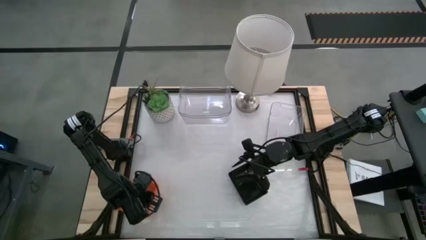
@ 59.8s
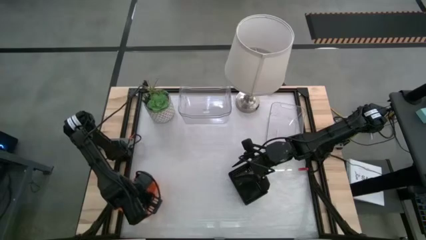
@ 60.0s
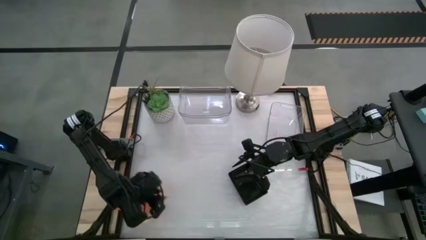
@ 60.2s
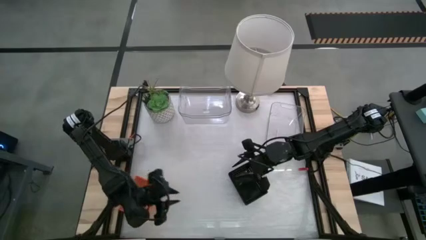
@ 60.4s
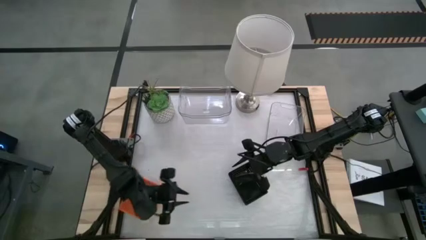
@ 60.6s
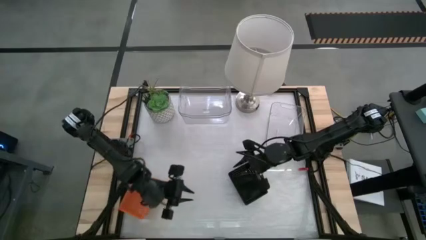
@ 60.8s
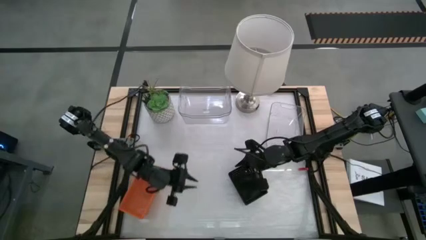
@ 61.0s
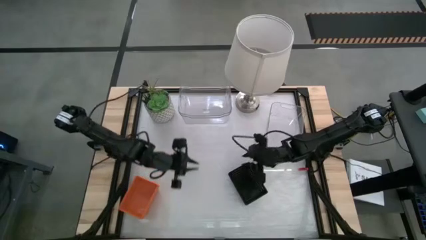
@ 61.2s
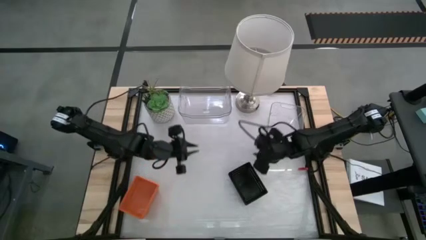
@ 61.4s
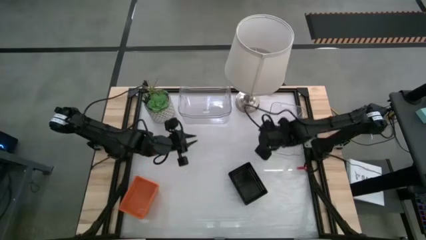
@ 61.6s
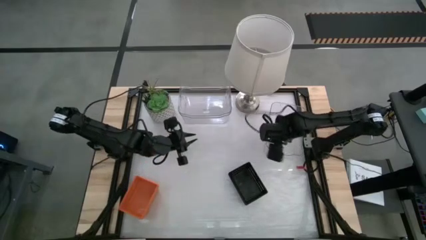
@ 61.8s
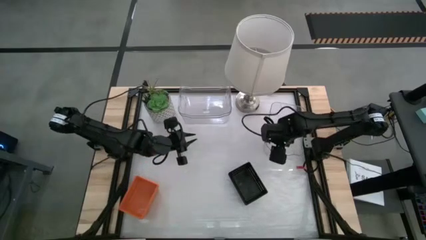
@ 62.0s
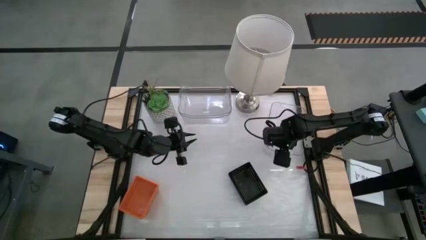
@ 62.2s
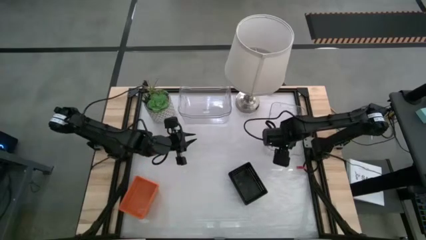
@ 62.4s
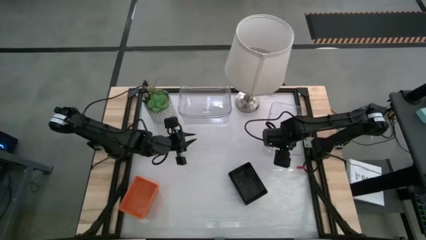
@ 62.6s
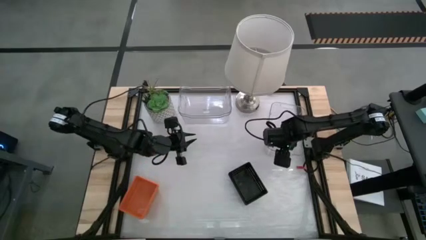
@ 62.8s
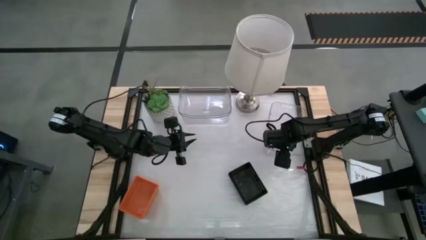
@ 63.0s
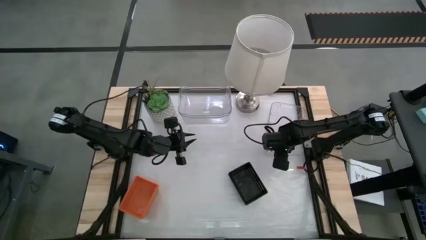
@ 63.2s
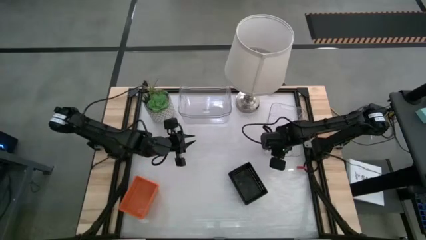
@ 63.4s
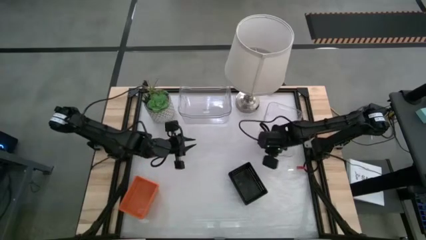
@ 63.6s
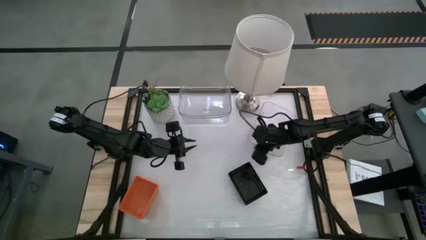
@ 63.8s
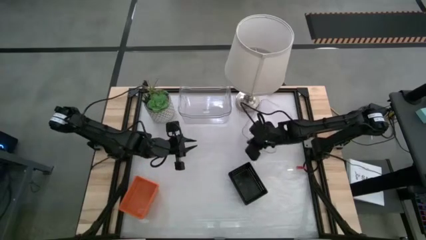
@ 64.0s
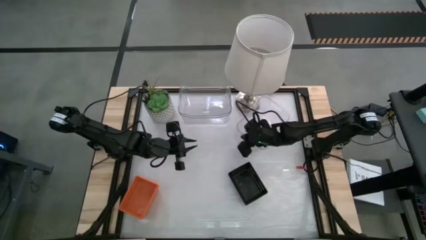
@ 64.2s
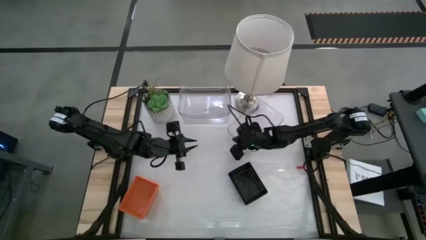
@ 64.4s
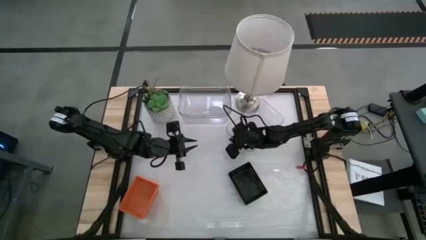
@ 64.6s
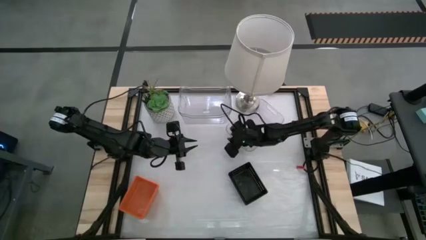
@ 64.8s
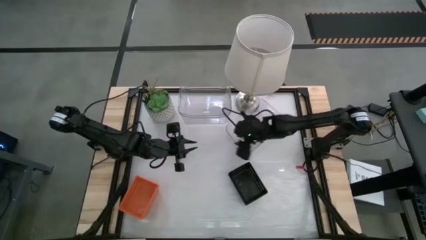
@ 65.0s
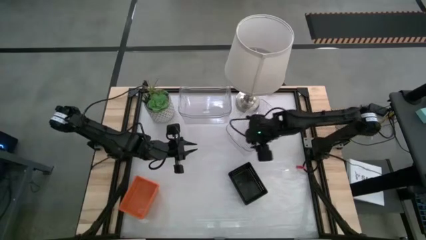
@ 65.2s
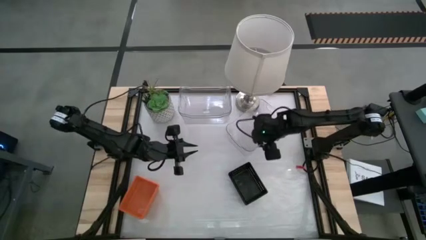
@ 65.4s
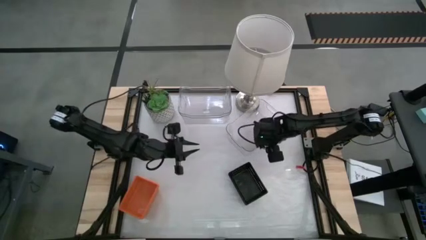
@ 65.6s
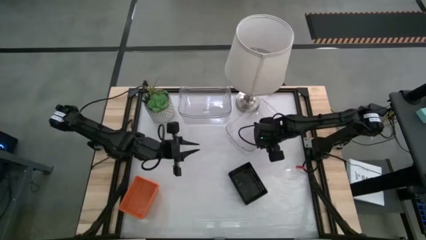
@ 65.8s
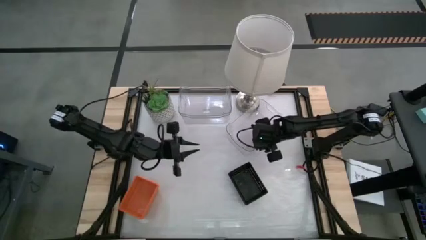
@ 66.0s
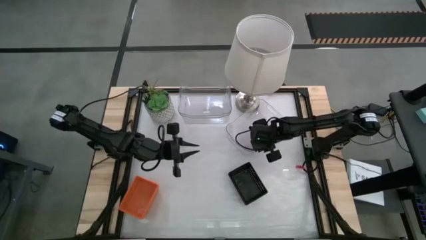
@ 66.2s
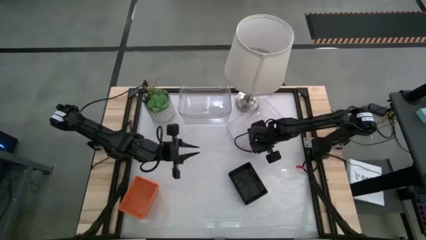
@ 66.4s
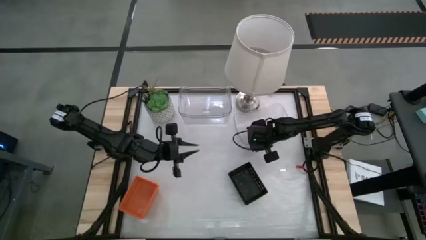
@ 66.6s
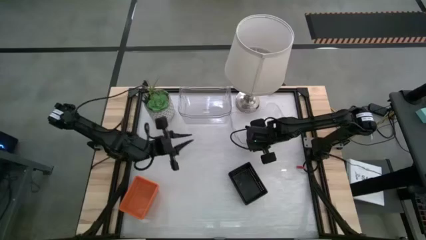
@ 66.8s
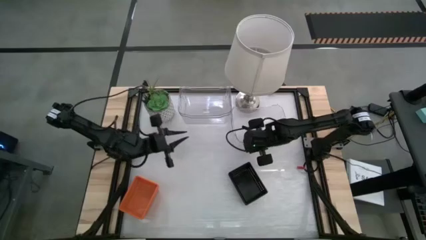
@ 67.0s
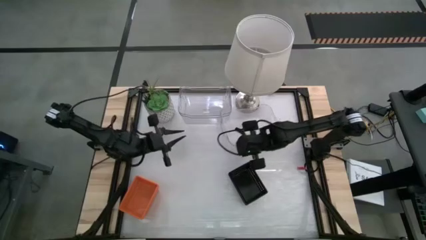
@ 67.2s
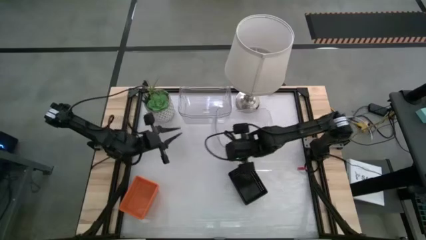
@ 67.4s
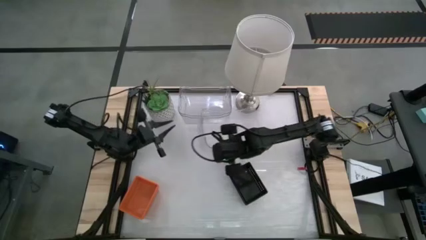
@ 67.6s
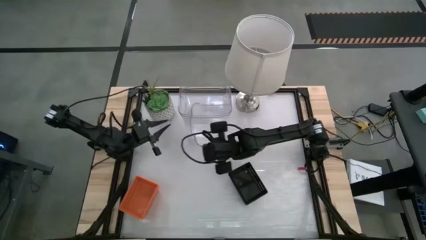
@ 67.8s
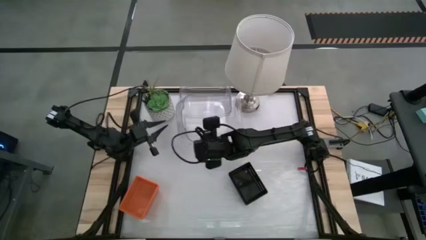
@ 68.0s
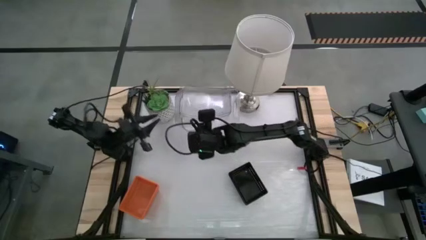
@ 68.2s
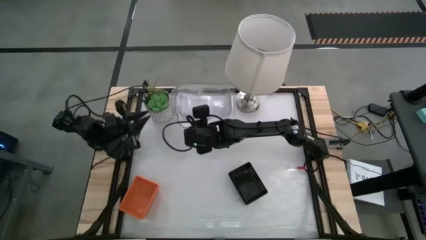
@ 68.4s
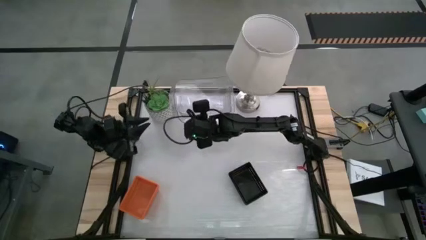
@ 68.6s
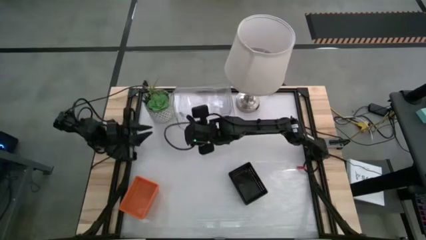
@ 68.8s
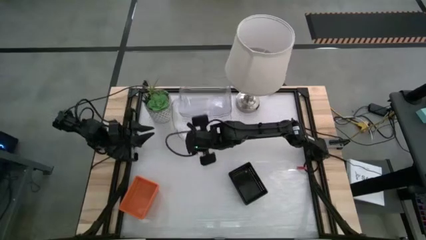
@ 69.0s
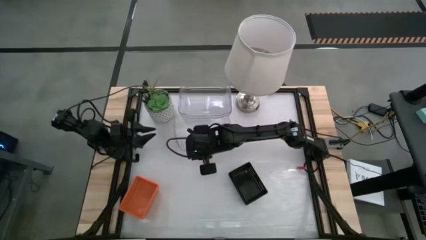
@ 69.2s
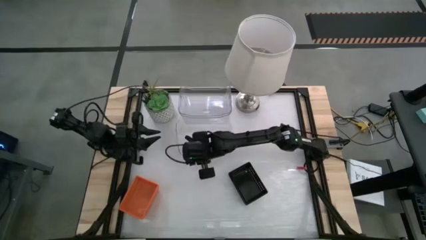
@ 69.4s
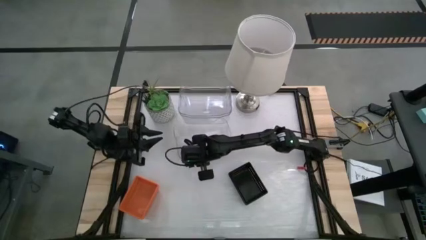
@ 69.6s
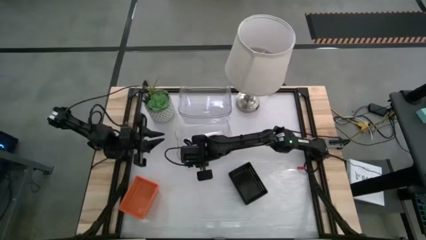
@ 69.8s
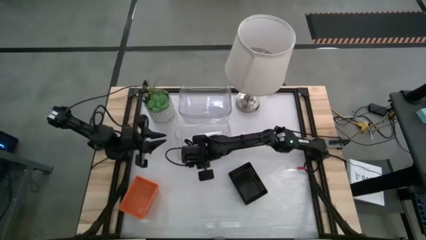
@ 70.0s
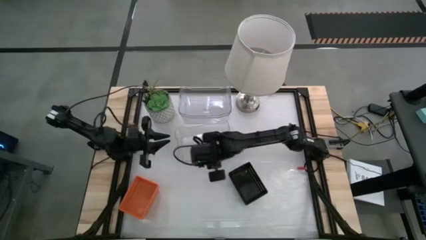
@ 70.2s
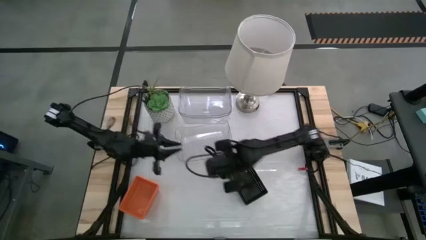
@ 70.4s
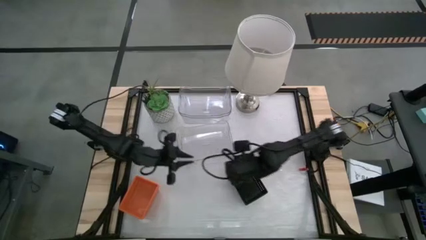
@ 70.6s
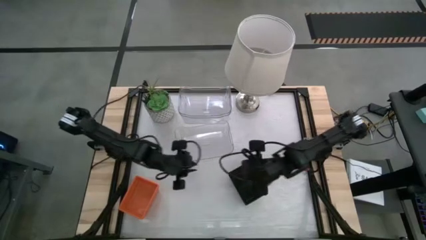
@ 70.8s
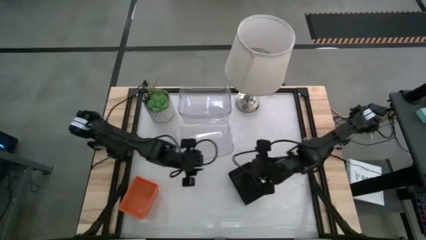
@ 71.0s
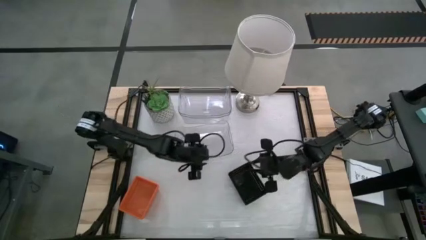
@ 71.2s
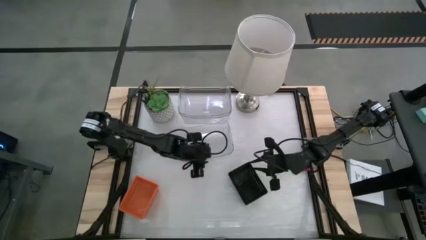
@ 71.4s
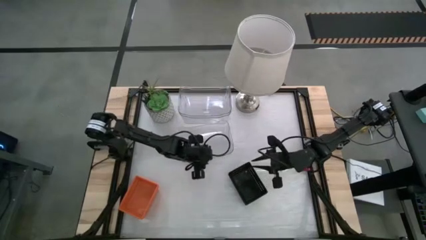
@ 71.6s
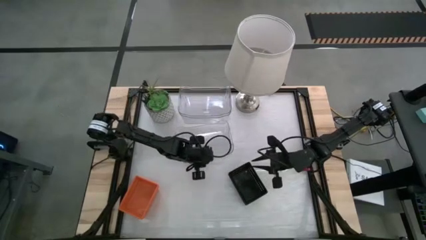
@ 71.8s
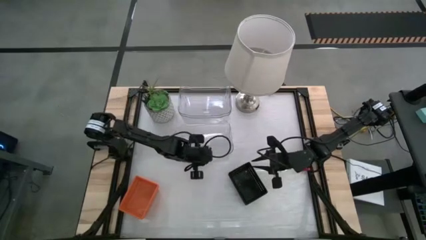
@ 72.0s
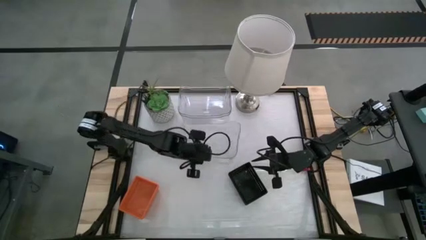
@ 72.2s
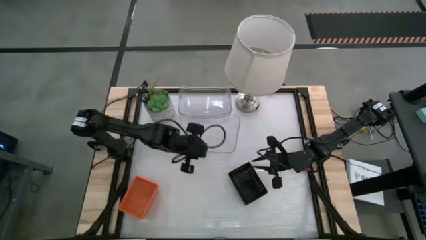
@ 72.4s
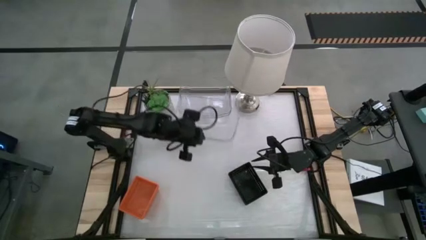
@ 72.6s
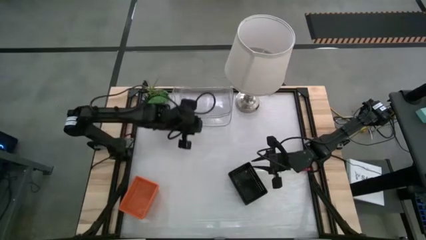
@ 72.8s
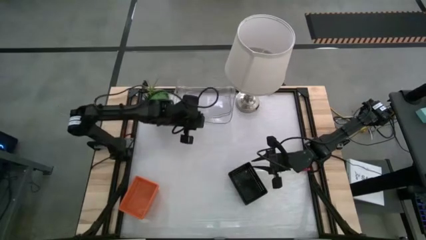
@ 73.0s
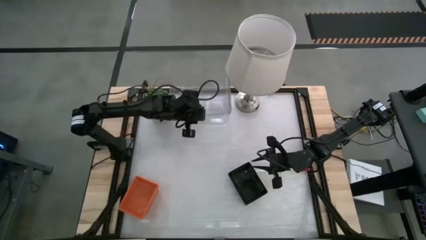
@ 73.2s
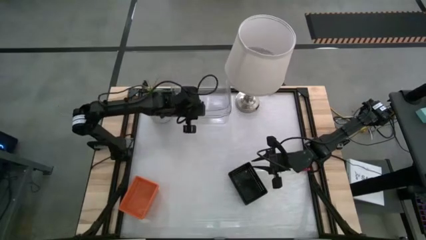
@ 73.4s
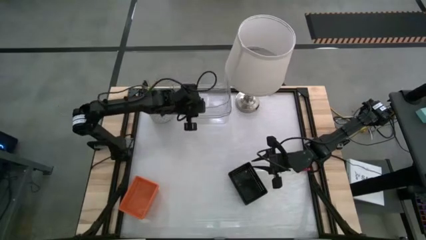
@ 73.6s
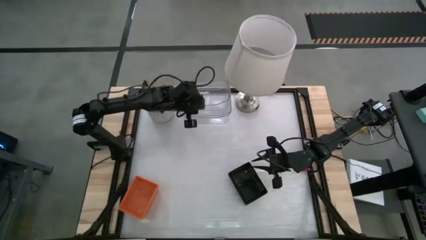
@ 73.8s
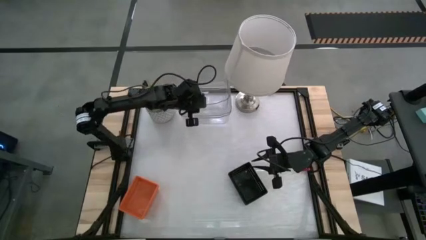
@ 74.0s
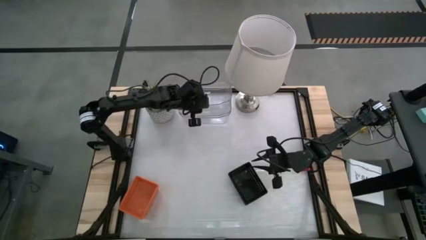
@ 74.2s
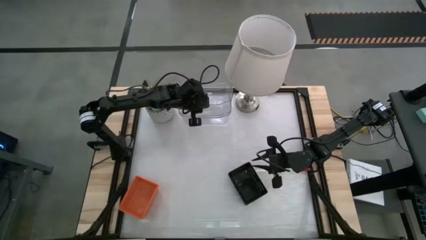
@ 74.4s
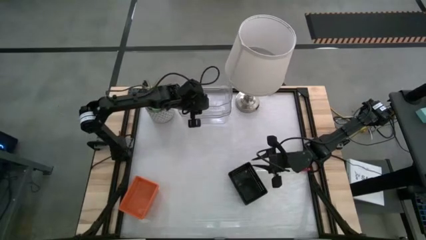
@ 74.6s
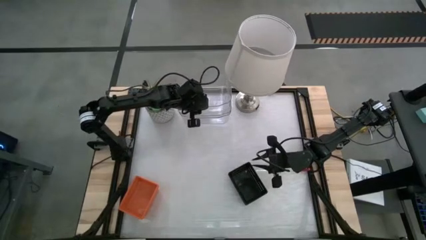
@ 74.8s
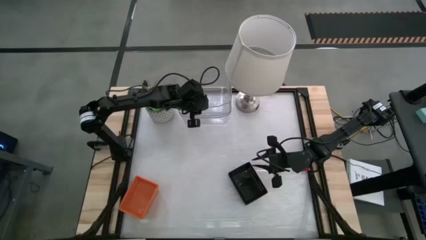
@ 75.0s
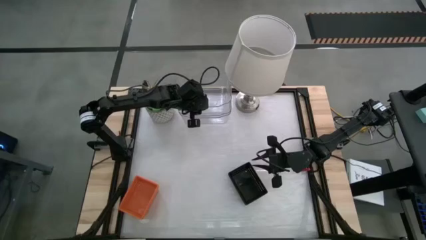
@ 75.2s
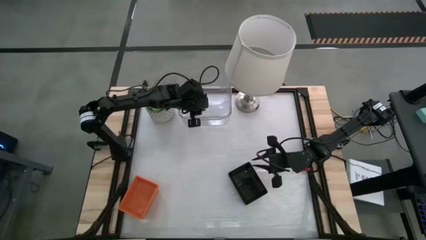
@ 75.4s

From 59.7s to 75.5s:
Stack the right transparent bin on the left transparent bins
